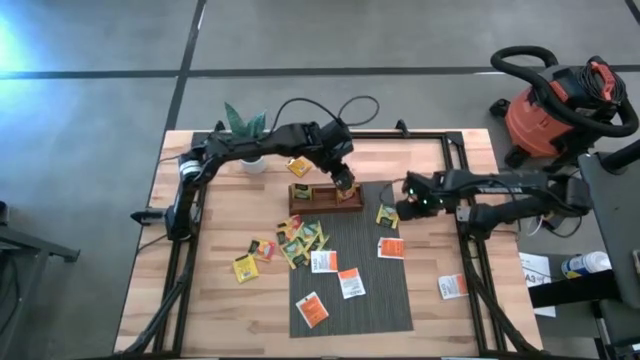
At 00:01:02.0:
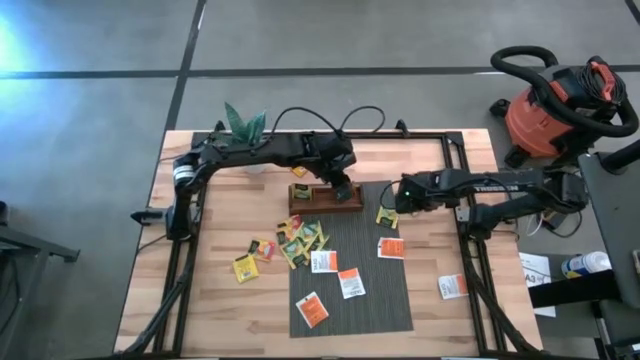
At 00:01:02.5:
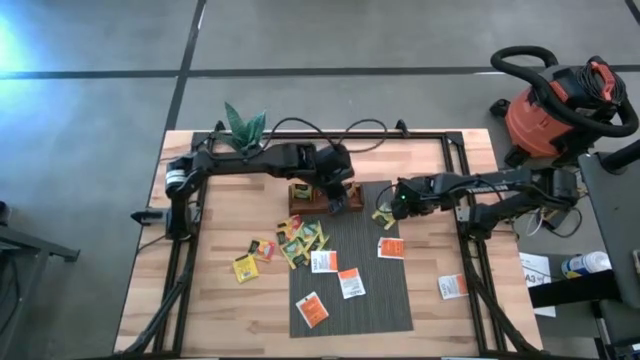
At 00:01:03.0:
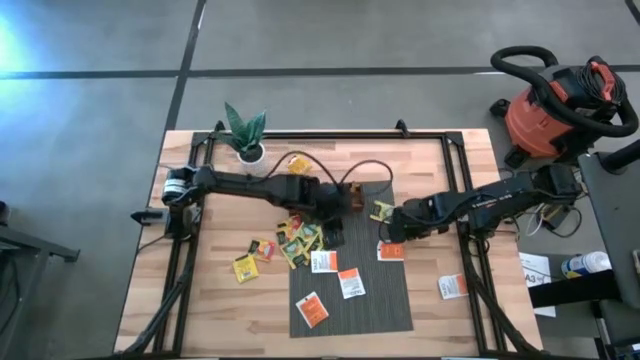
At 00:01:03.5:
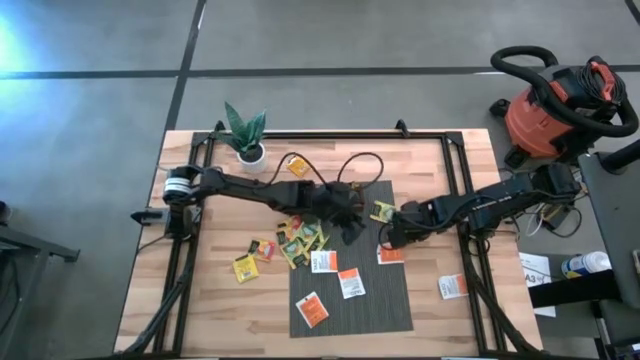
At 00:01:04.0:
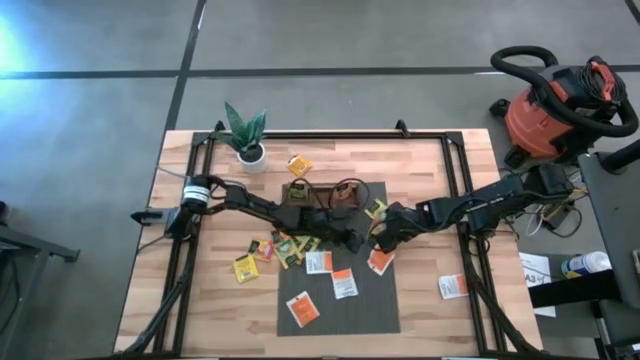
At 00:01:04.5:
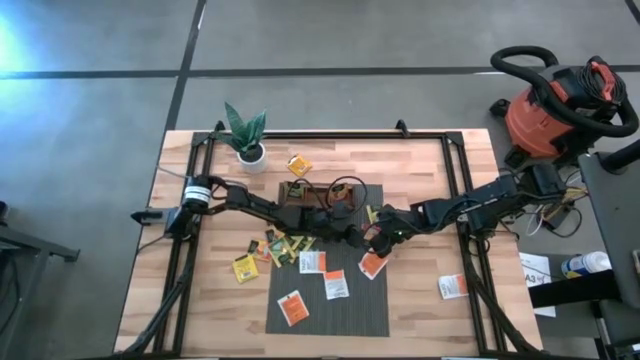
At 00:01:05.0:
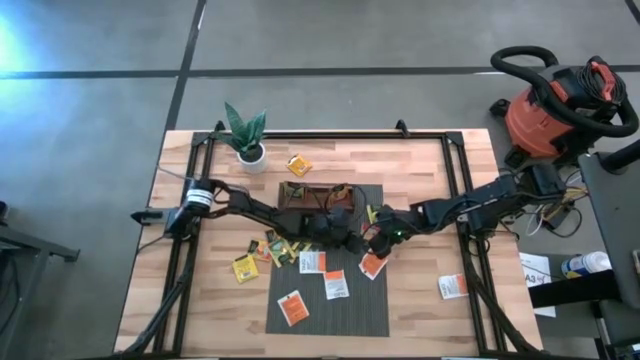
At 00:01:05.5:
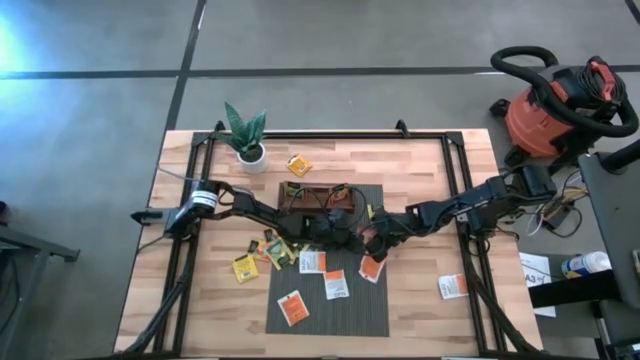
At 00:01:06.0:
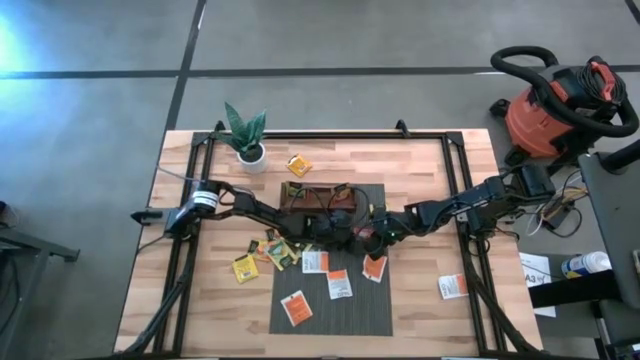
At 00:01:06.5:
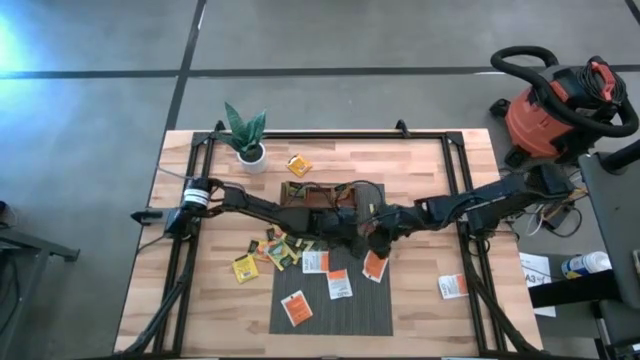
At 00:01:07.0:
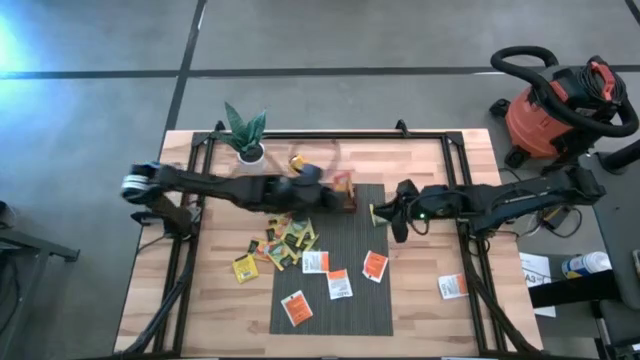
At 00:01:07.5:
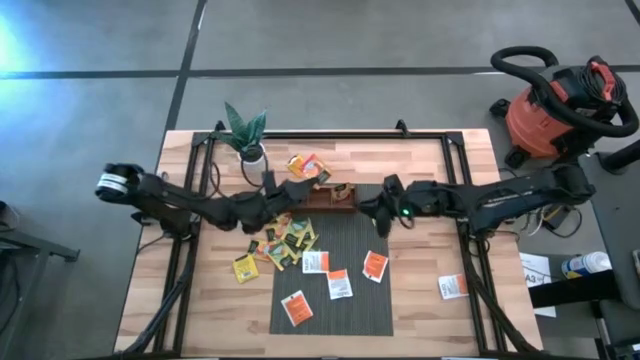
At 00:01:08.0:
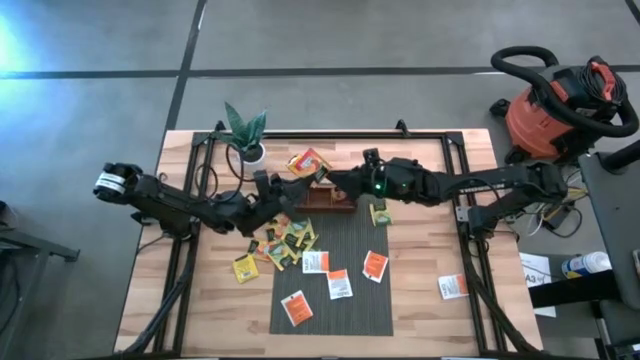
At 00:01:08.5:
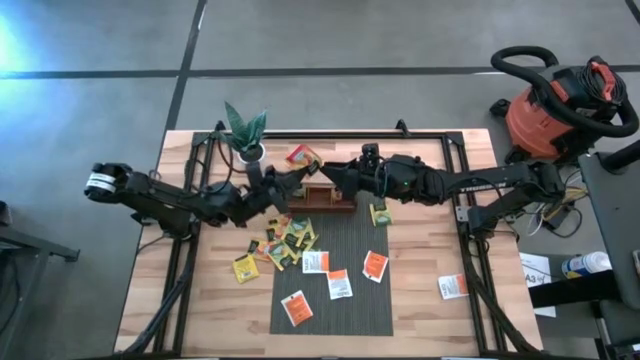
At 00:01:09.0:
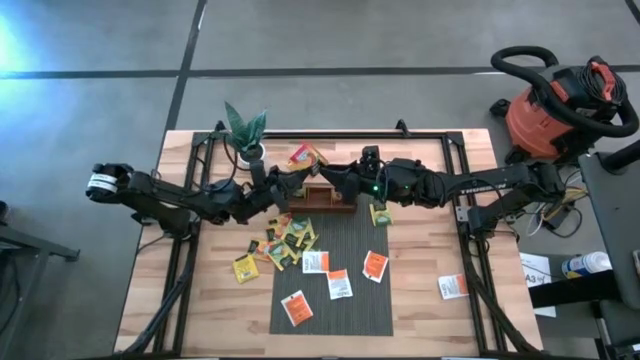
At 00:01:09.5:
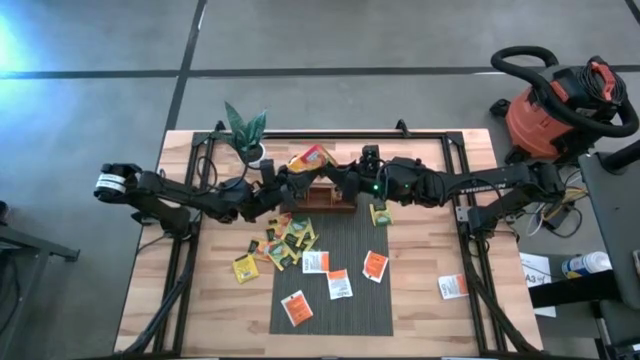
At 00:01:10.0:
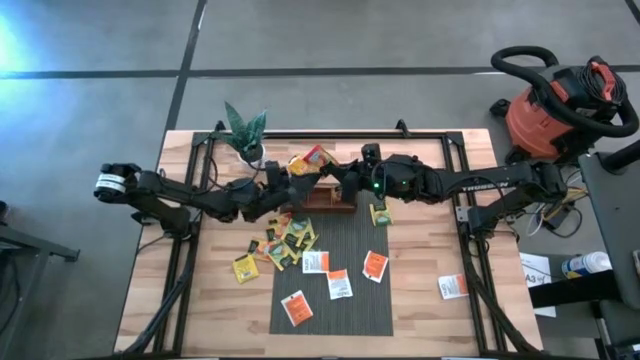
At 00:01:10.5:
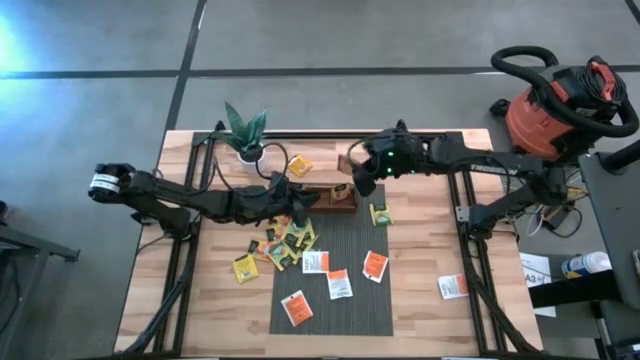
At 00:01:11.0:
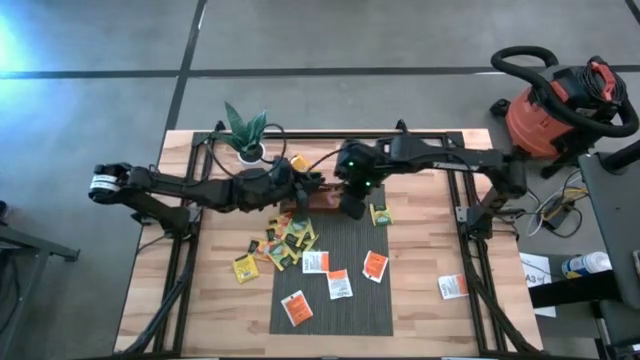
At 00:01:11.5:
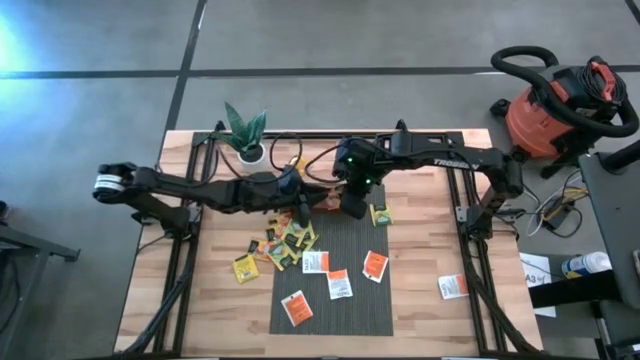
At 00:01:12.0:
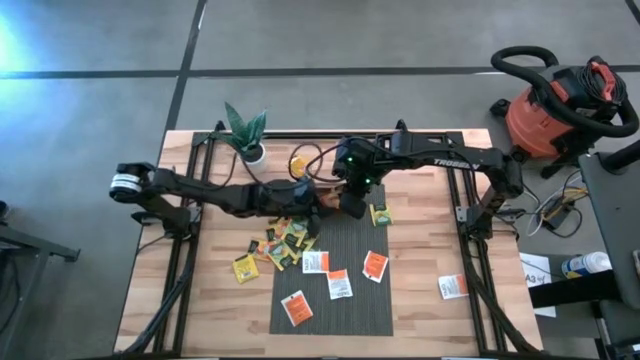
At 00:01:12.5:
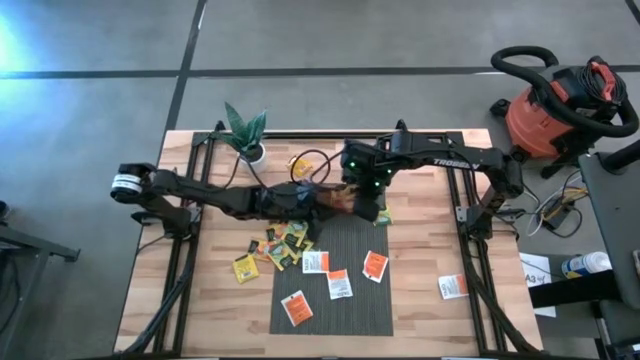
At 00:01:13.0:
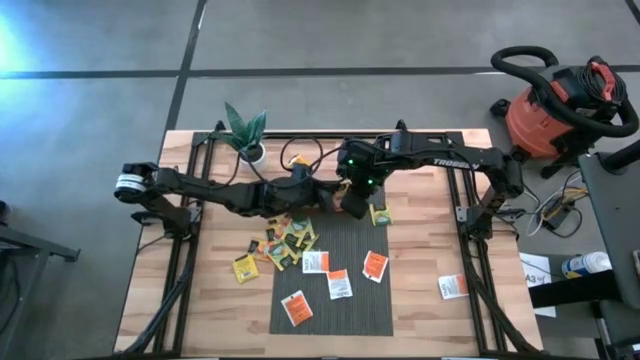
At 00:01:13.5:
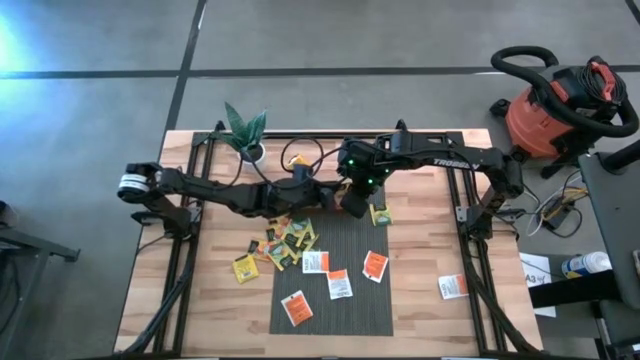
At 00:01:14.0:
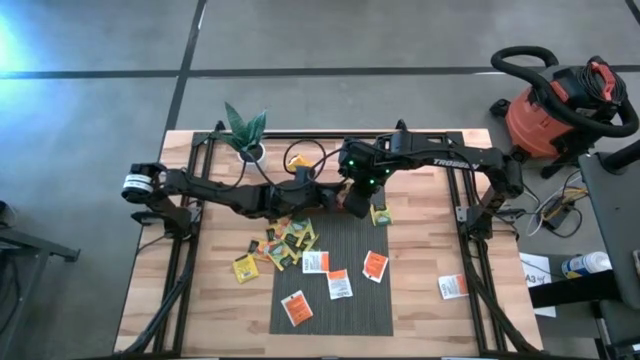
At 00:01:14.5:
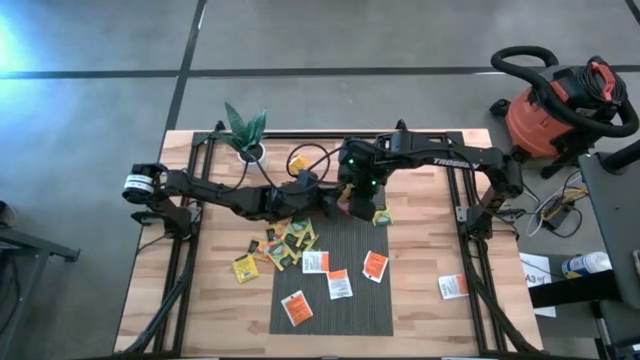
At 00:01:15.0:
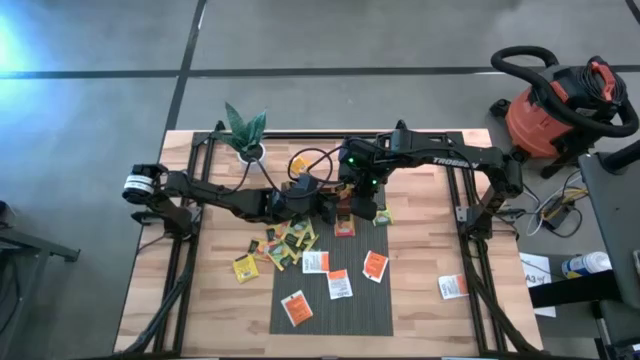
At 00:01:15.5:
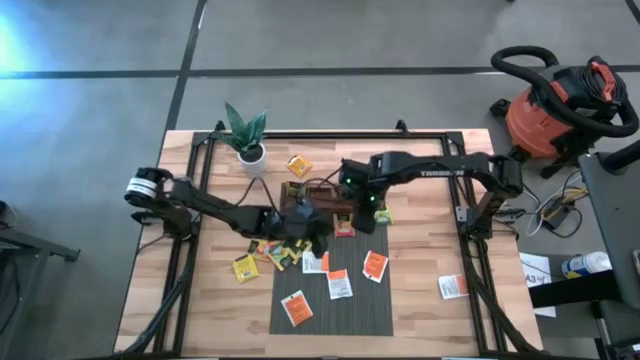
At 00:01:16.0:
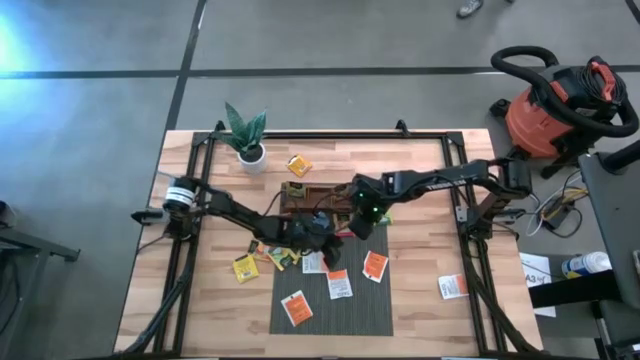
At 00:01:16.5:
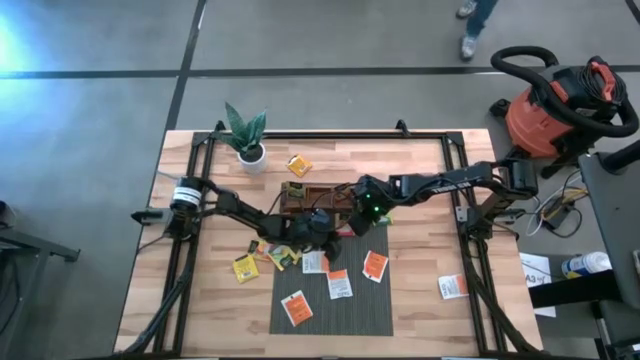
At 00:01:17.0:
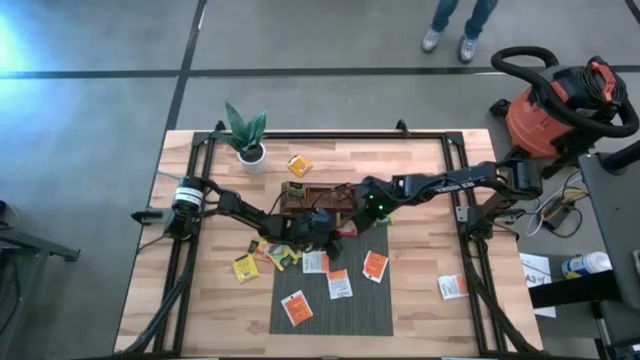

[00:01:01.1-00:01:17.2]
Task: Pick & Place Tea
Put the orange tea bag into the right compartment of the wooden organizer

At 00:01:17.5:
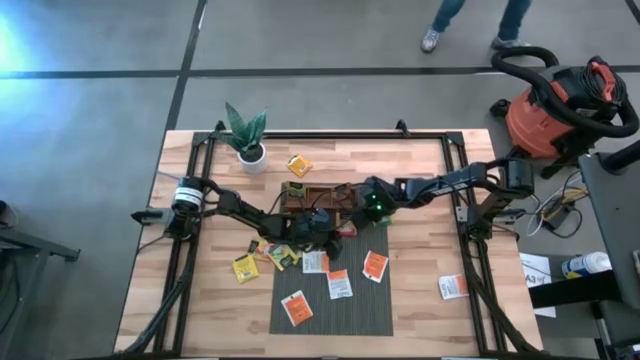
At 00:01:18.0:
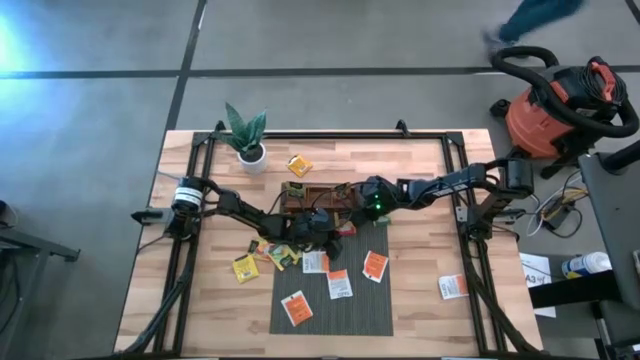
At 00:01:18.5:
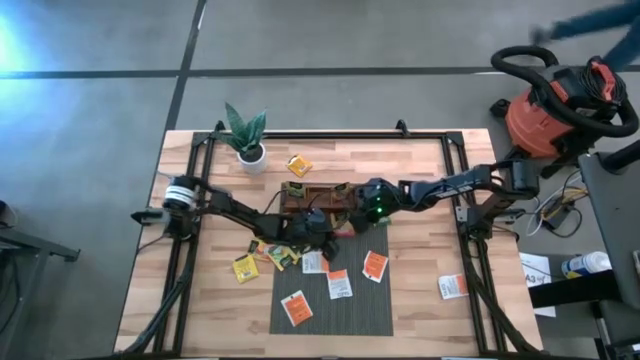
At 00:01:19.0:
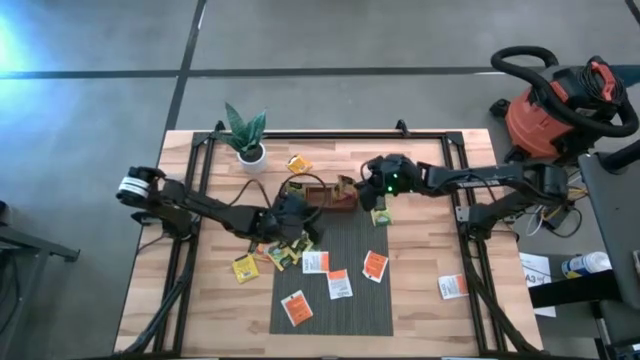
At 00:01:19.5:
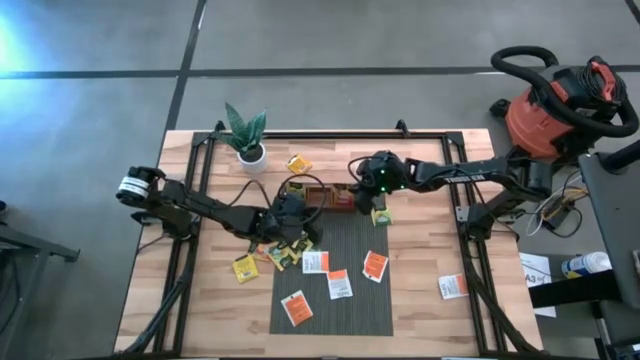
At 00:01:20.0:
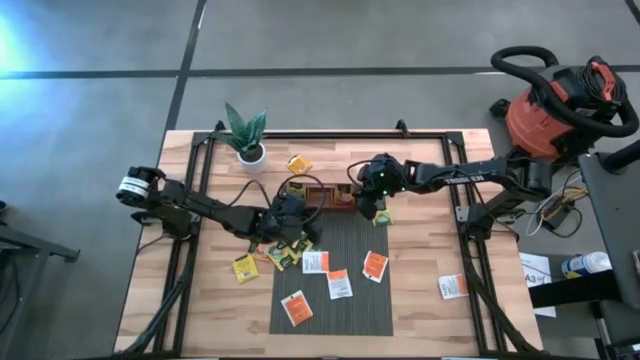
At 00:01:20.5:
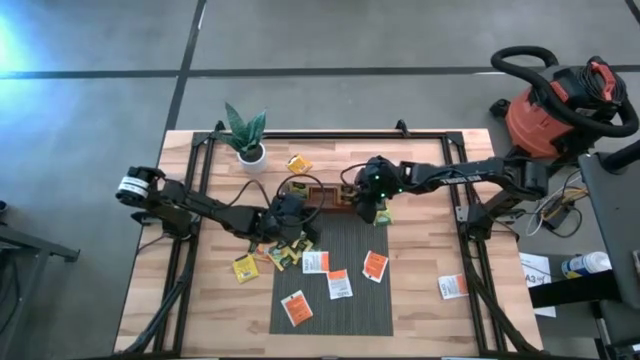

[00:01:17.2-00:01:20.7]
Put the orange tea bag into the right compartment of the wooden organizer

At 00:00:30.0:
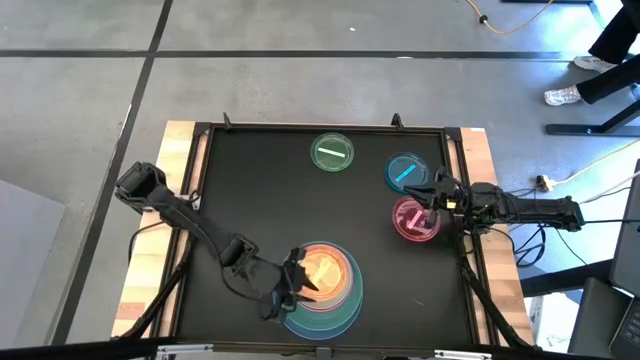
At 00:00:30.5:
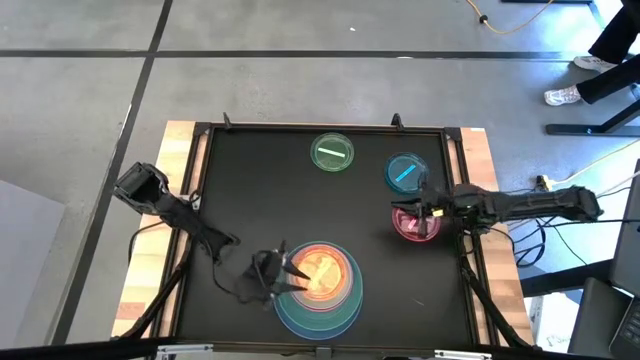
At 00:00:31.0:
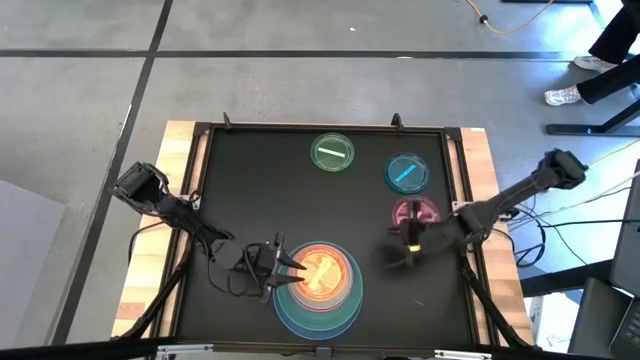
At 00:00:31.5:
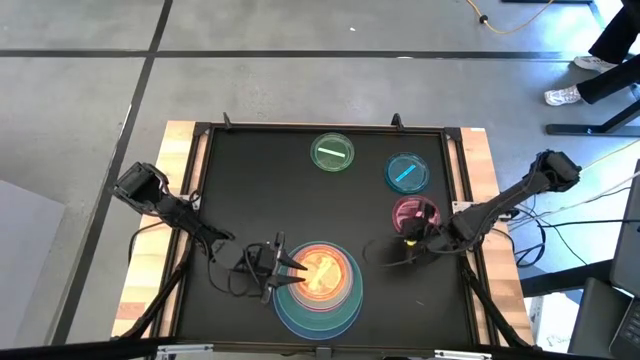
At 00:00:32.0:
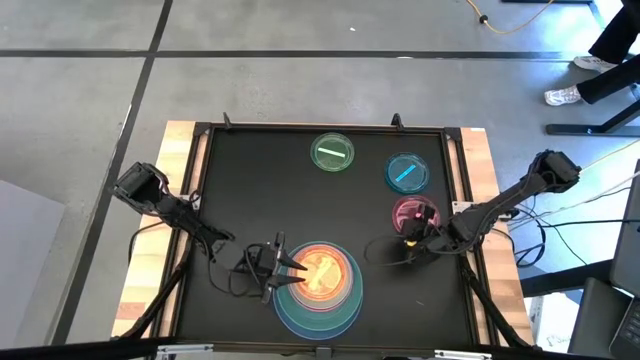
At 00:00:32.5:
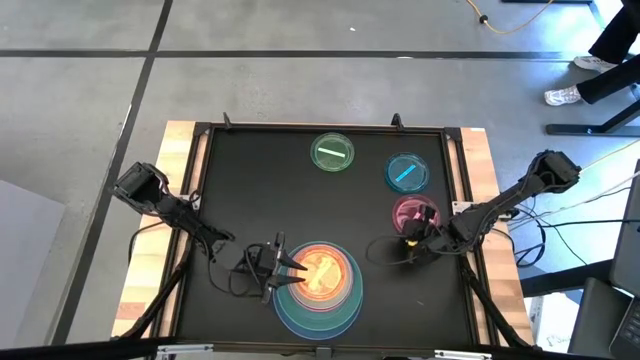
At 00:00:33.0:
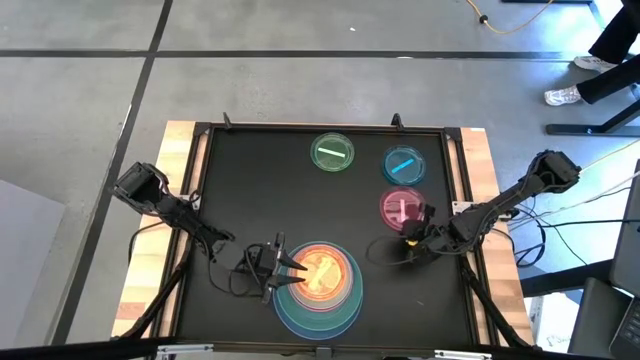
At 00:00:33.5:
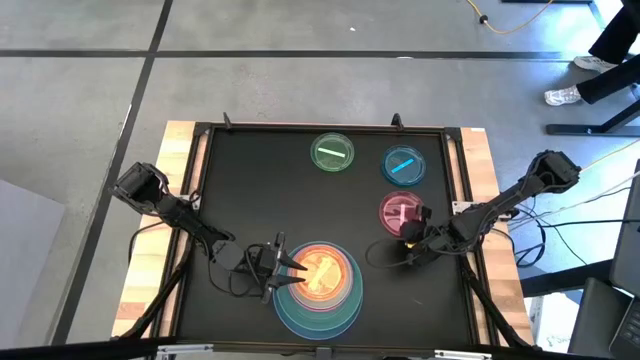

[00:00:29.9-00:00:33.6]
Task: Stack plastic plates
Stack the light pink plate on the orange plate
